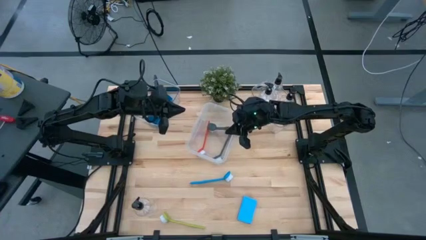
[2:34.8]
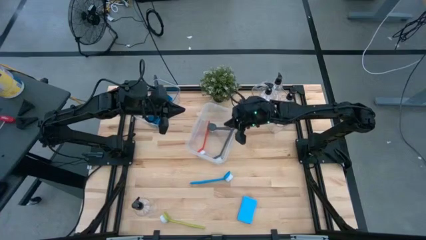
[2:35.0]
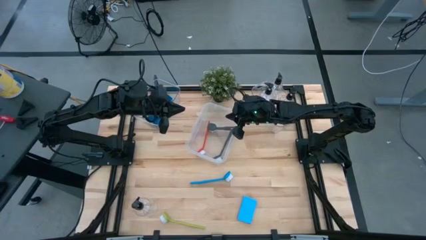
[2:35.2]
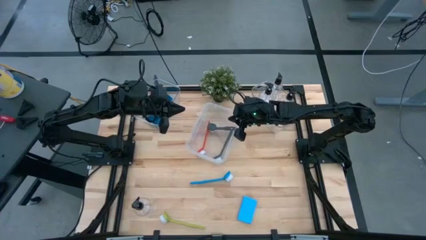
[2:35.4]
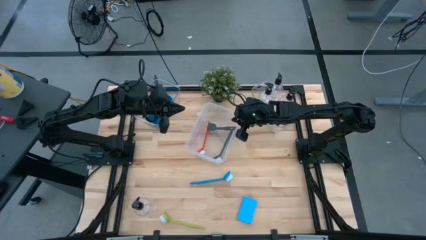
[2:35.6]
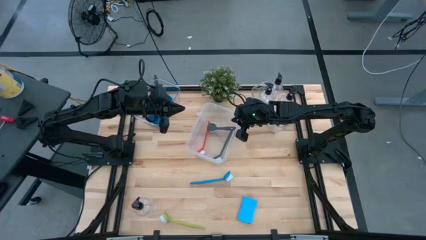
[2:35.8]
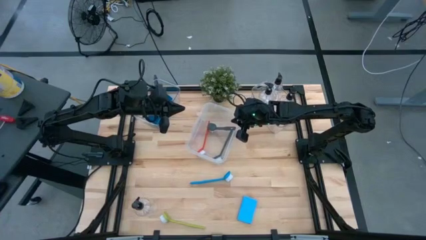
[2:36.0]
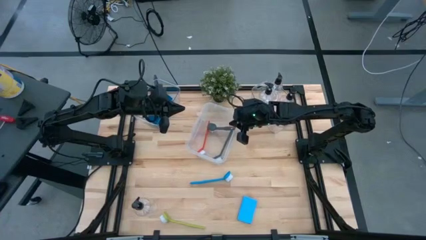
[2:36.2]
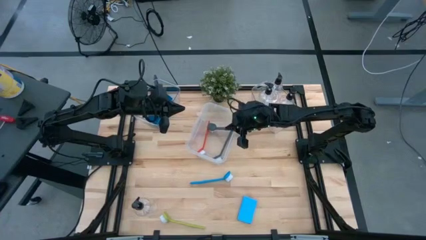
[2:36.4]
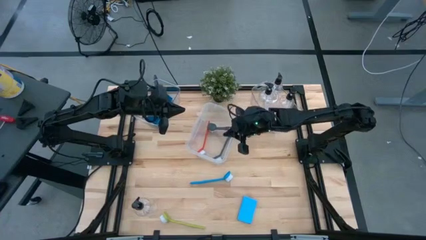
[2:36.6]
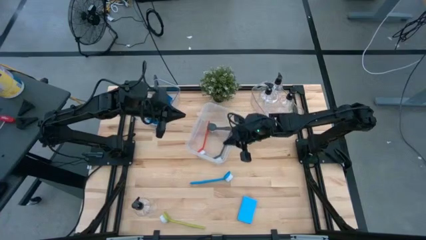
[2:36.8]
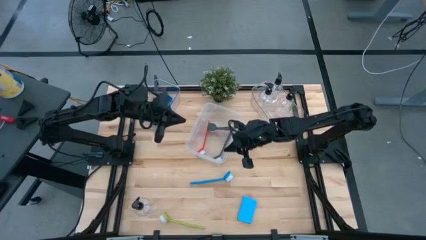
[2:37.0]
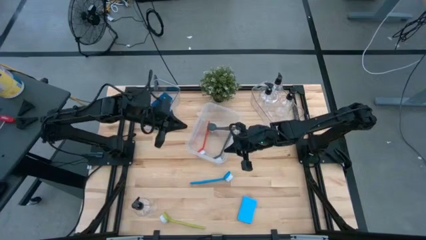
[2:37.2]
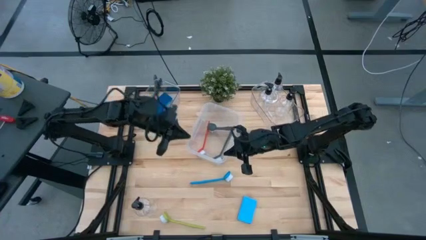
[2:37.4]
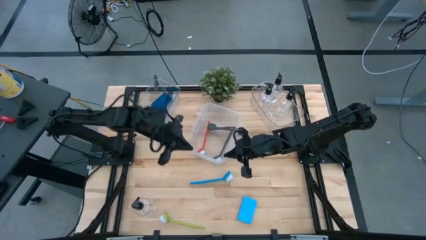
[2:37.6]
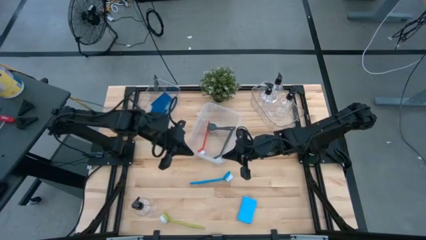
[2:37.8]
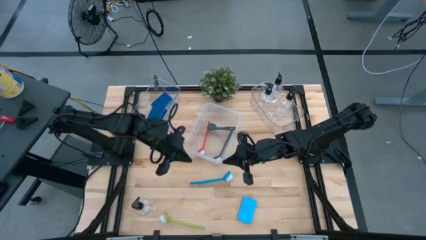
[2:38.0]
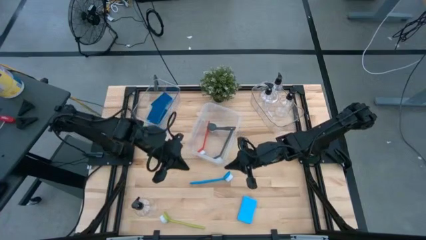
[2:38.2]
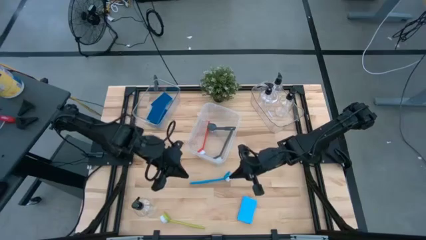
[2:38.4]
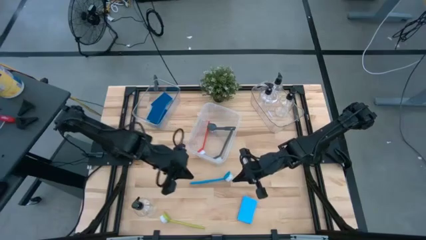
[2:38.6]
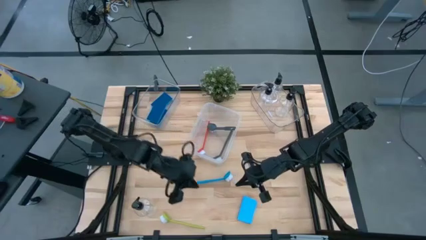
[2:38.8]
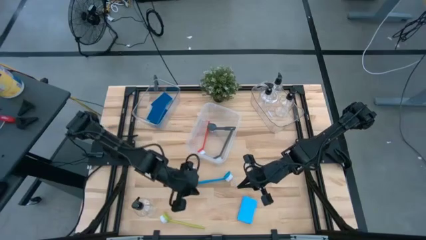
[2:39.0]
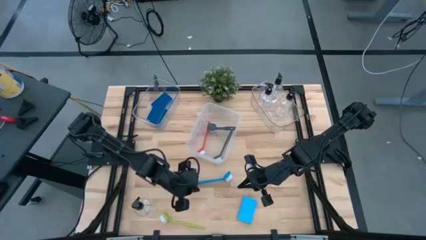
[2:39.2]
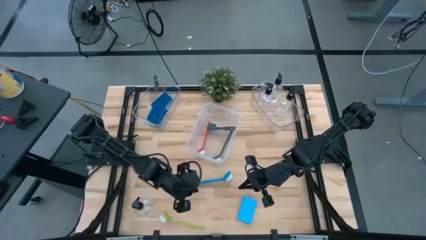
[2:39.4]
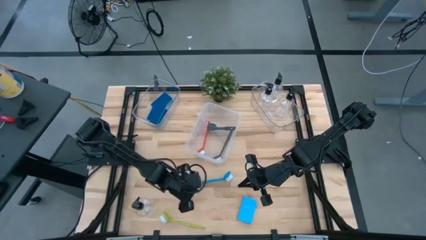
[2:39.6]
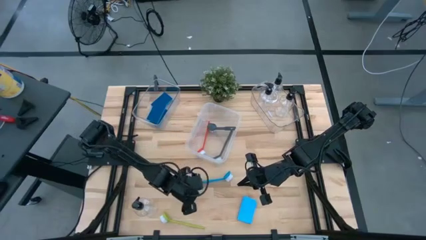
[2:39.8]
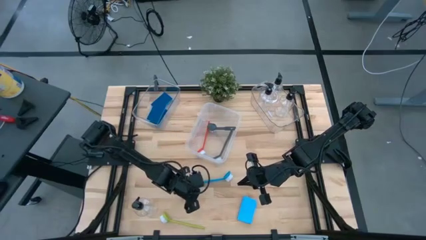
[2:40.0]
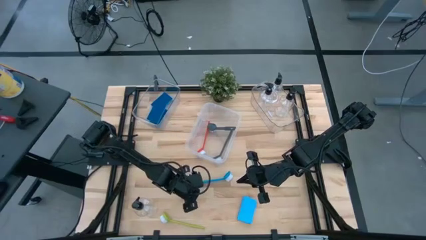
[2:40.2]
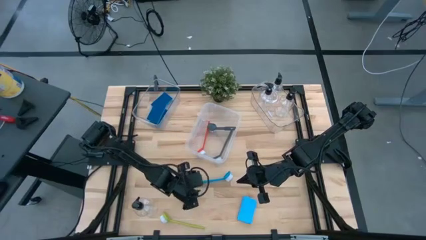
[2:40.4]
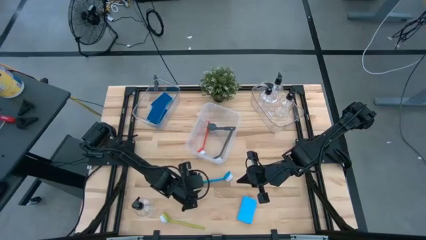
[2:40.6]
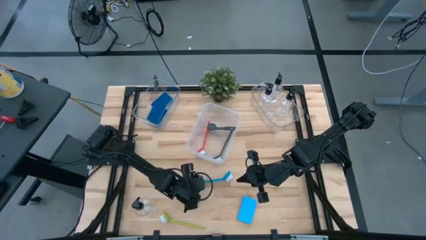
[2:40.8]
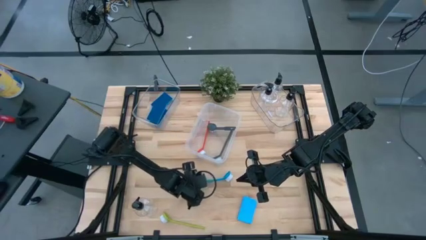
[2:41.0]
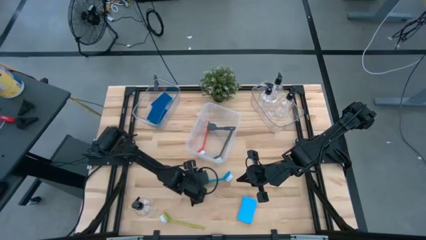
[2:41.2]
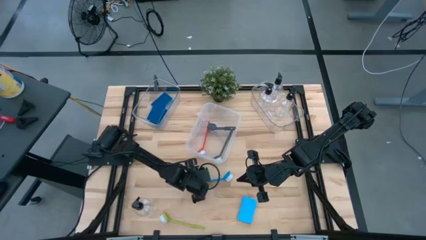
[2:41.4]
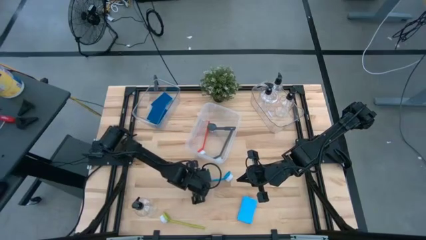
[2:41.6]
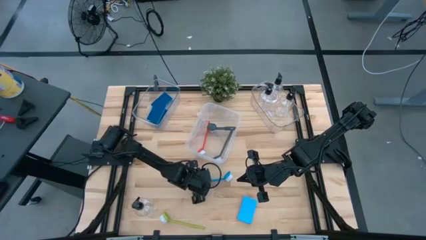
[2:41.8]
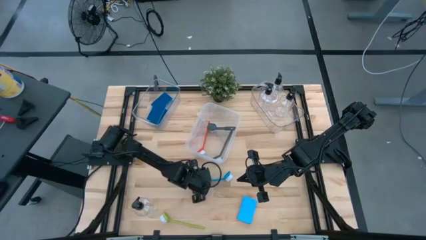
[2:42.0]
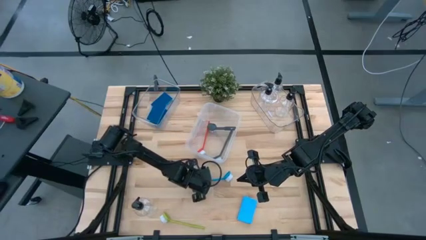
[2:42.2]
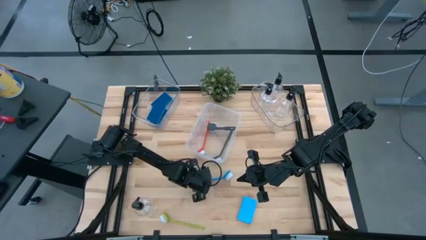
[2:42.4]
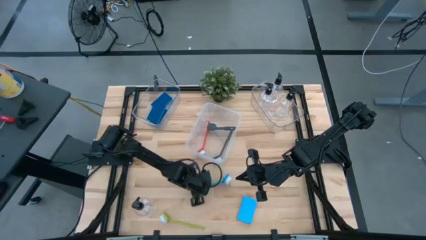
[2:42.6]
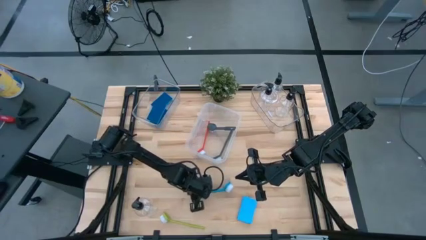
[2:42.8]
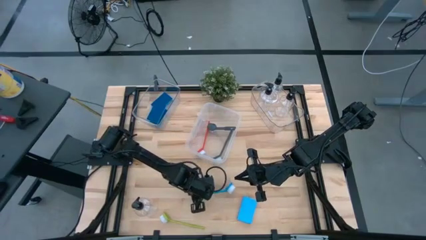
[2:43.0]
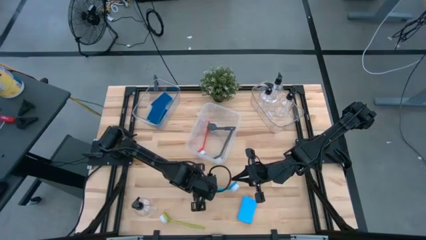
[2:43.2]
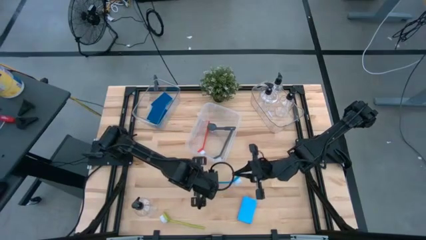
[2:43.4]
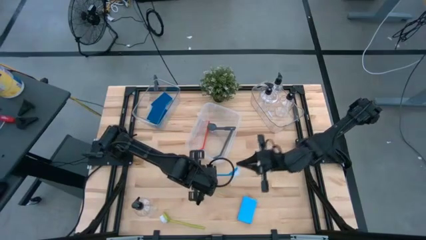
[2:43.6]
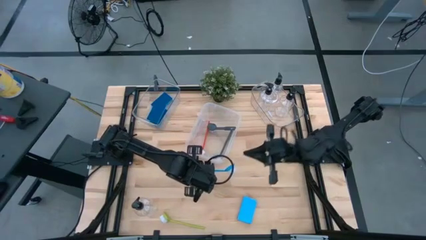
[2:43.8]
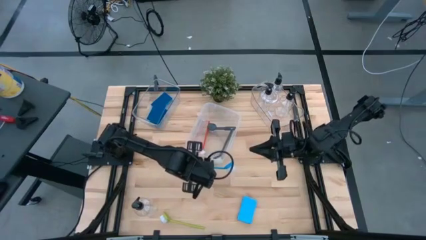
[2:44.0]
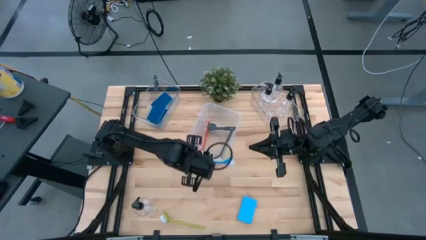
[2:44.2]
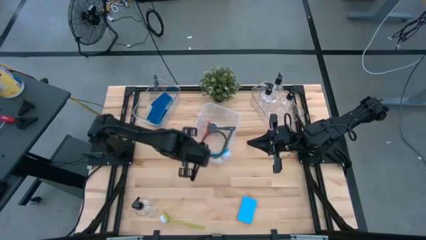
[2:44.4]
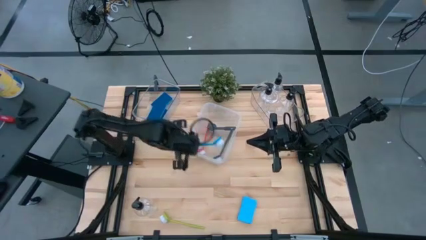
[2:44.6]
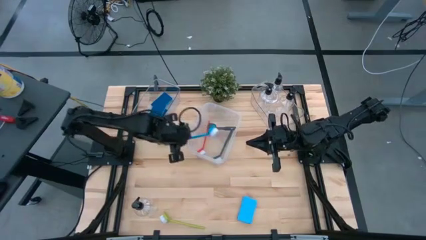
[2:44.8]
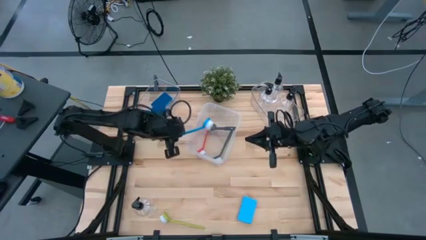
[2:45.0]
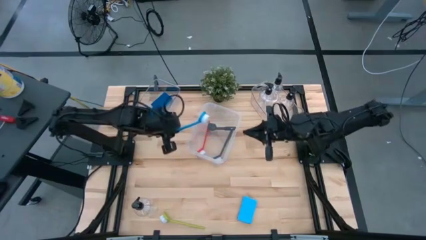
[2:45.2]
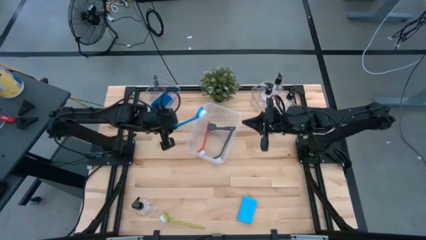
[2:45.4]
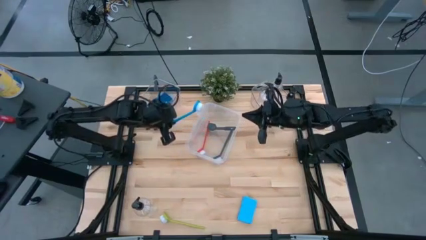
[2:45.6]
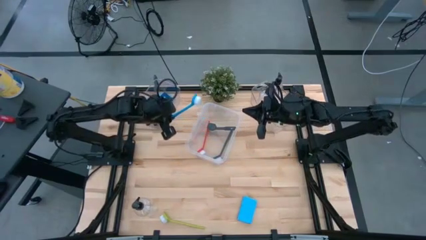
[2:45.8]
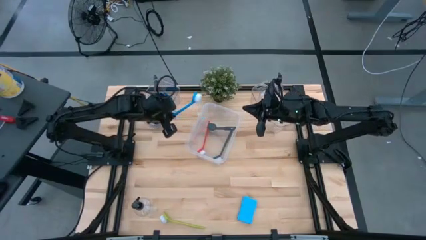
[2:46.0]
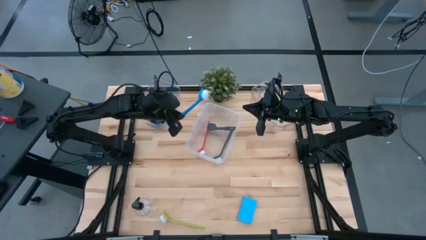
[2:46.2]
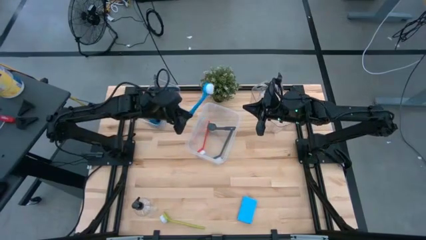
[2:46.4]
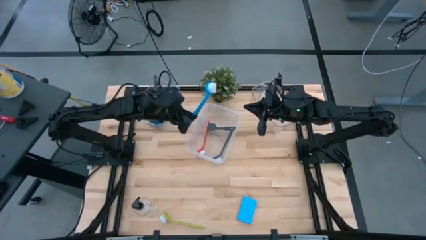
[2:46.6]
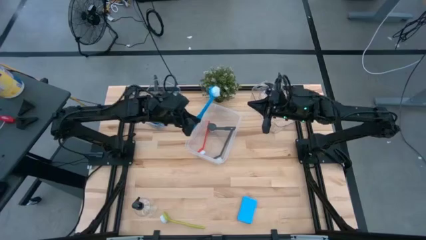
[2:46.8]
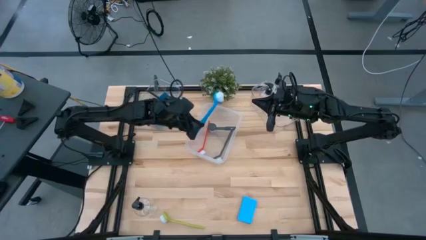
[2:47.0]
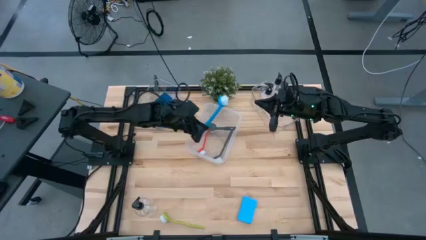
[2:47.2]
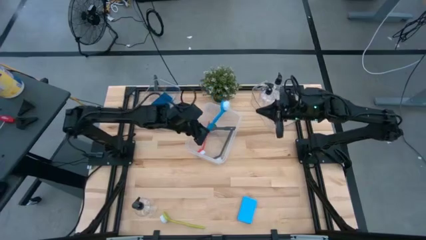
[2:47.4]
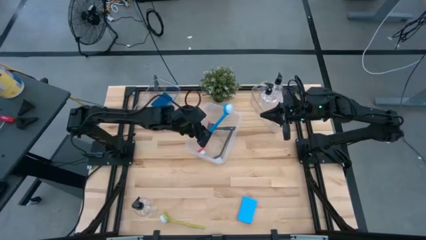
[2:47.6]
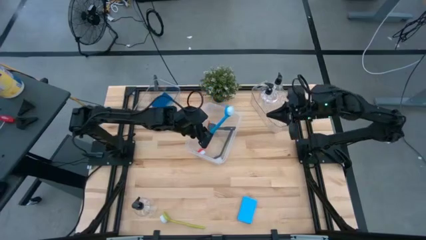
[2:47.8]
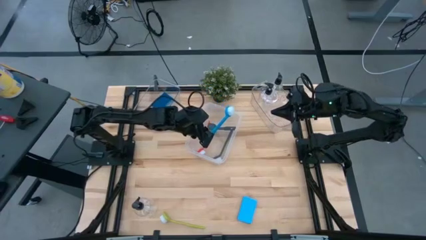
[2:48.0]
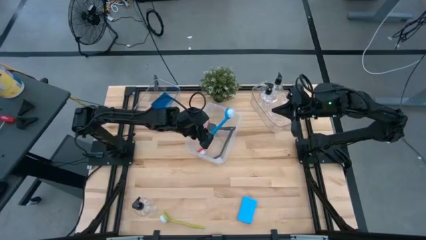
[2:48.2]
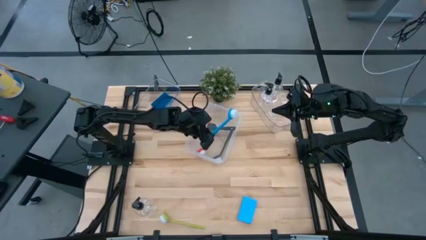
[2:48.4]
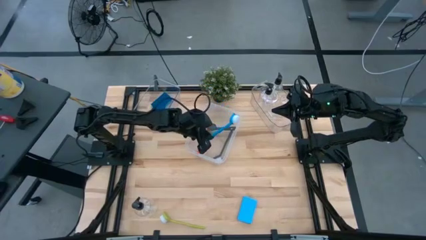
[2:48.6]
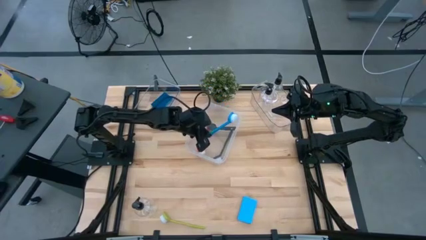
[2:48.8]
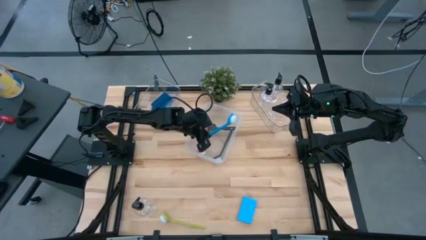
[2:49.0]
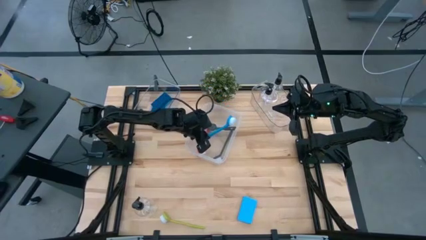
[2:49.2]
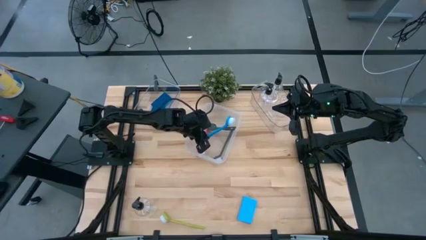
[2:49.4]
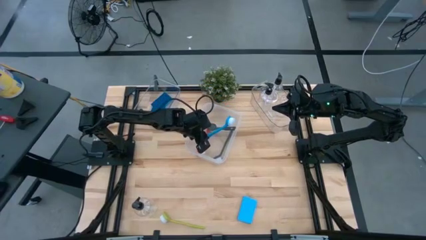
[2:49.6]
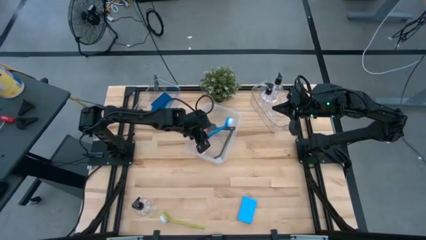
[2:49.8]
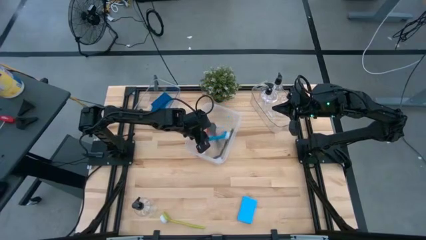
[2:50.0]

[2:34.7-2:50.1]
Task: Pick & Place Kitchen Sink Supplies
Put the blue dish brush into the transparent container
